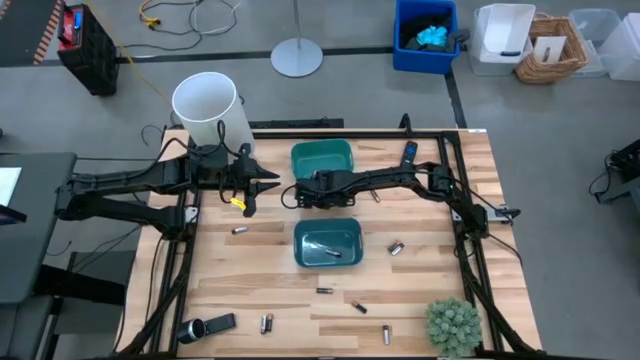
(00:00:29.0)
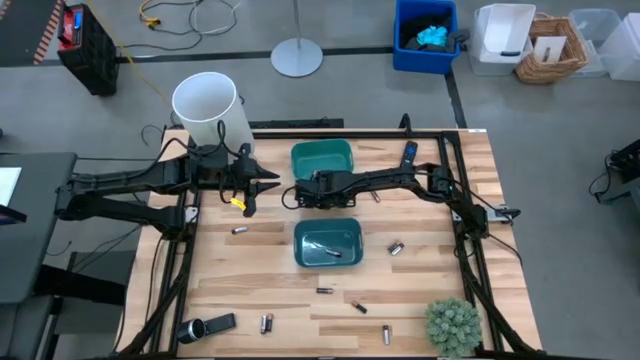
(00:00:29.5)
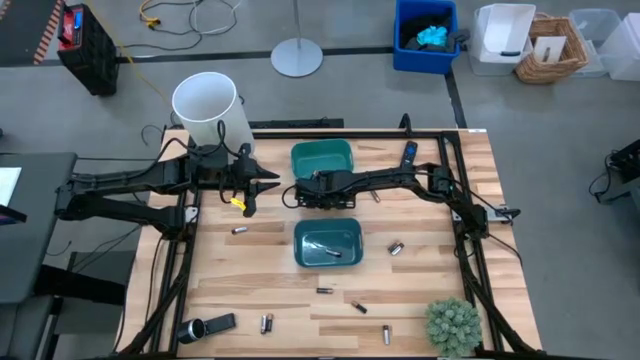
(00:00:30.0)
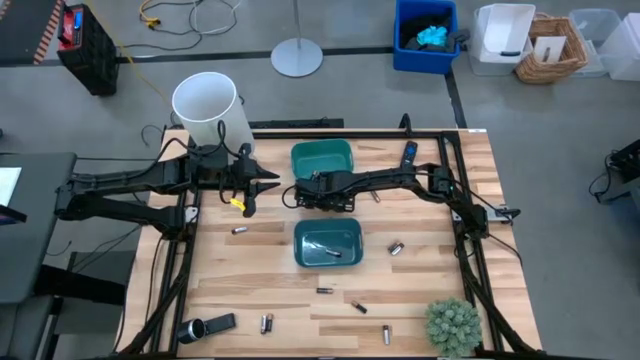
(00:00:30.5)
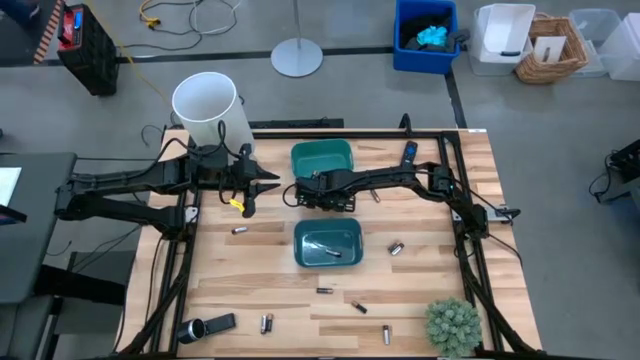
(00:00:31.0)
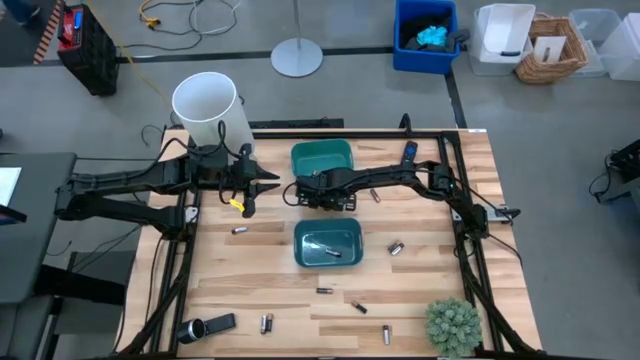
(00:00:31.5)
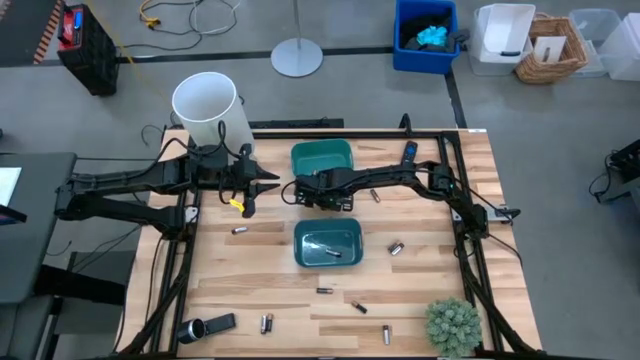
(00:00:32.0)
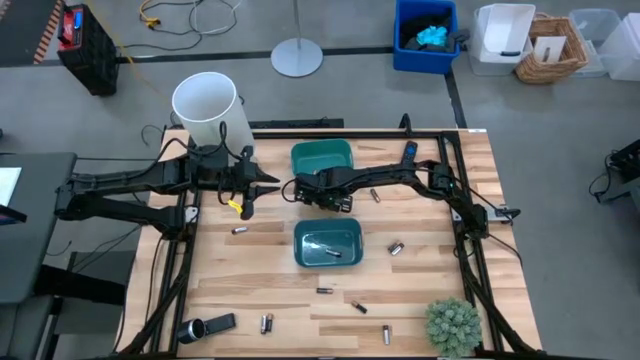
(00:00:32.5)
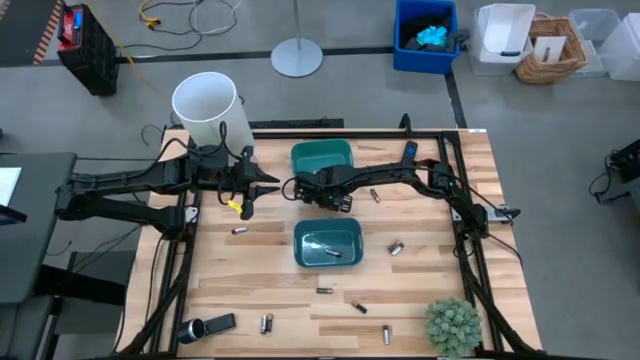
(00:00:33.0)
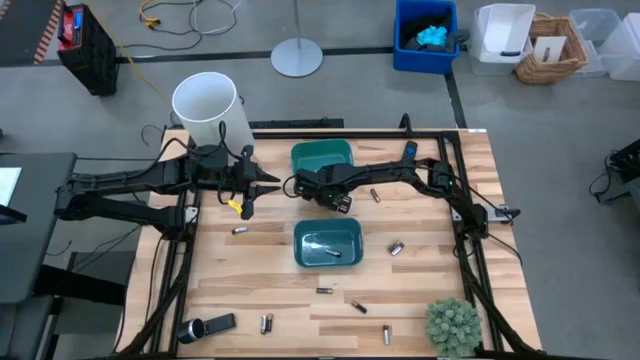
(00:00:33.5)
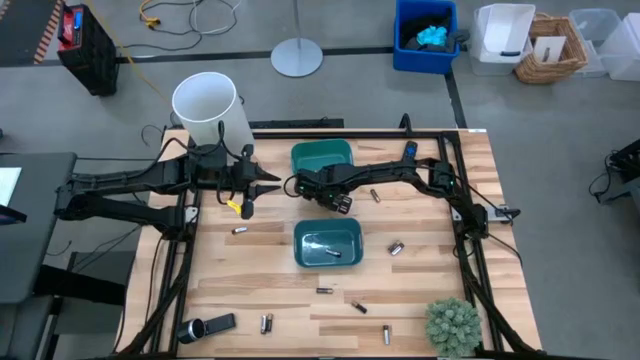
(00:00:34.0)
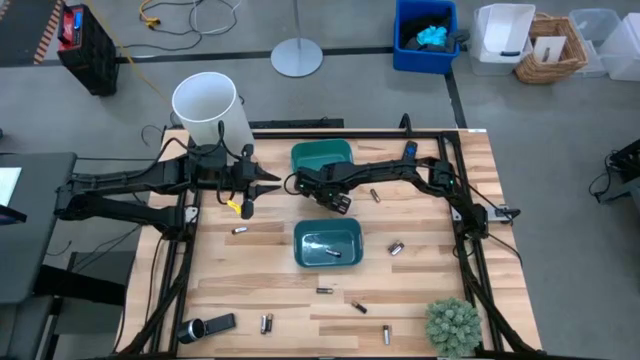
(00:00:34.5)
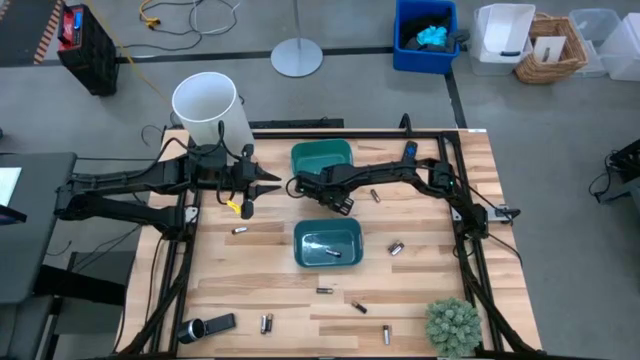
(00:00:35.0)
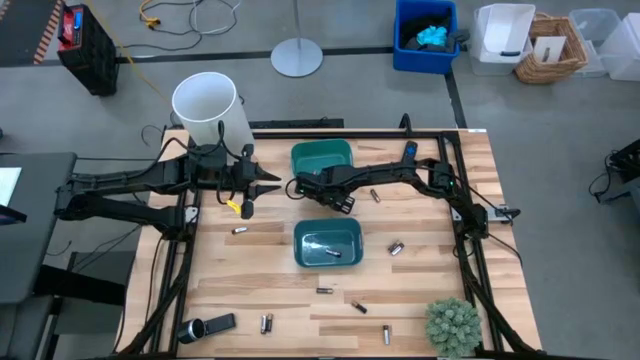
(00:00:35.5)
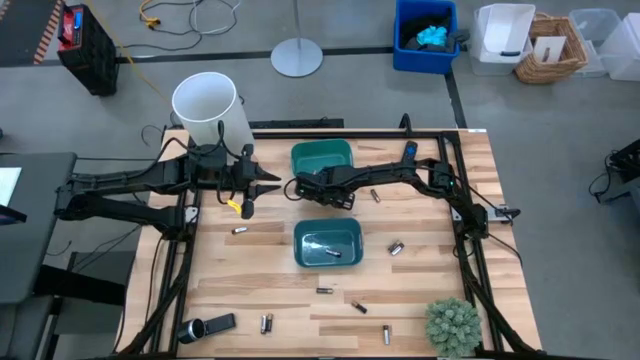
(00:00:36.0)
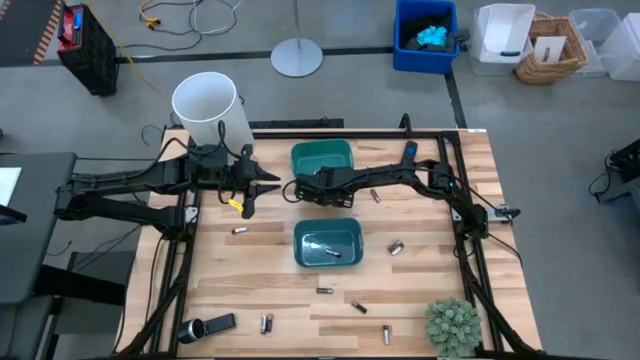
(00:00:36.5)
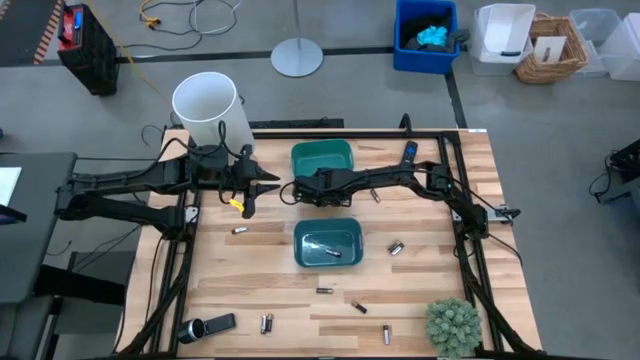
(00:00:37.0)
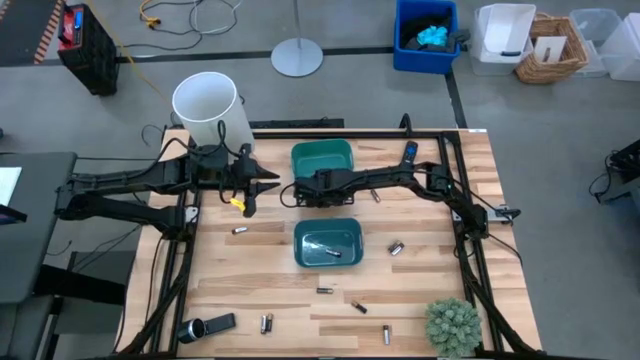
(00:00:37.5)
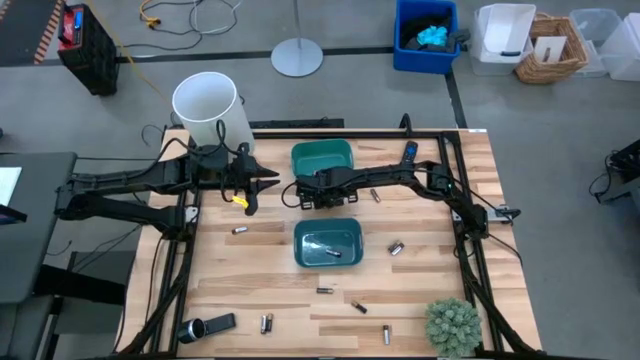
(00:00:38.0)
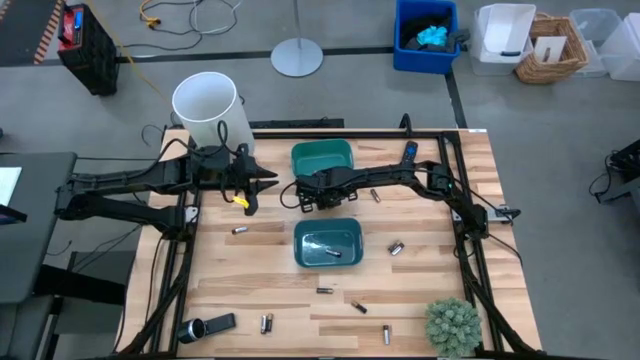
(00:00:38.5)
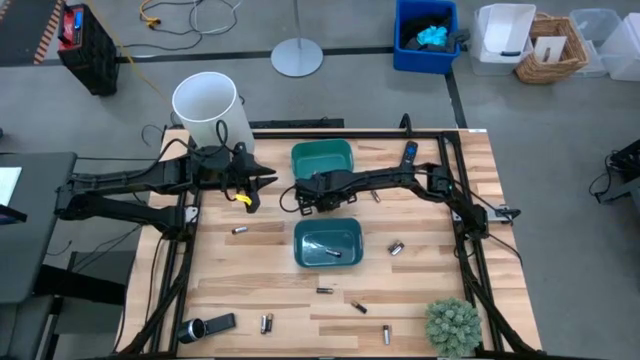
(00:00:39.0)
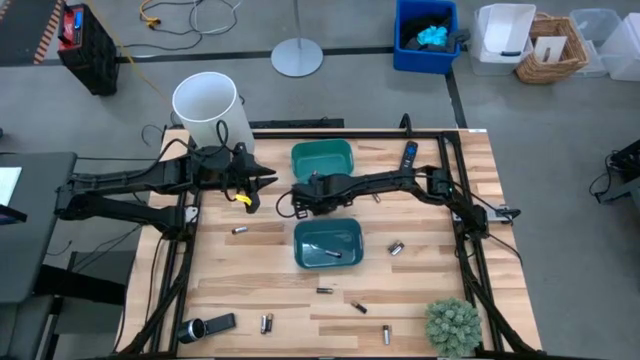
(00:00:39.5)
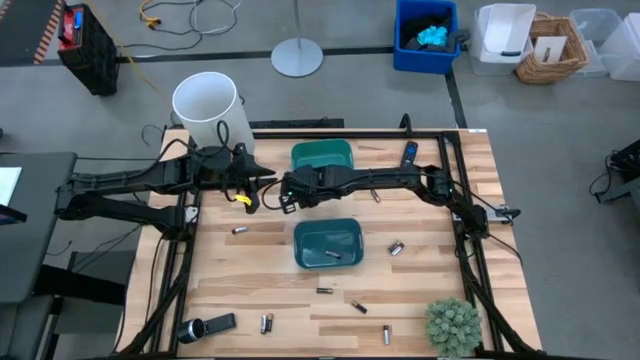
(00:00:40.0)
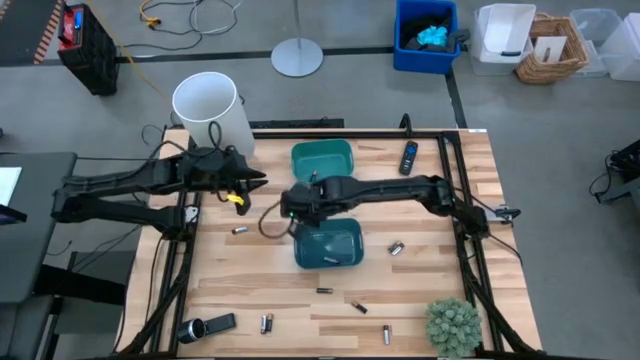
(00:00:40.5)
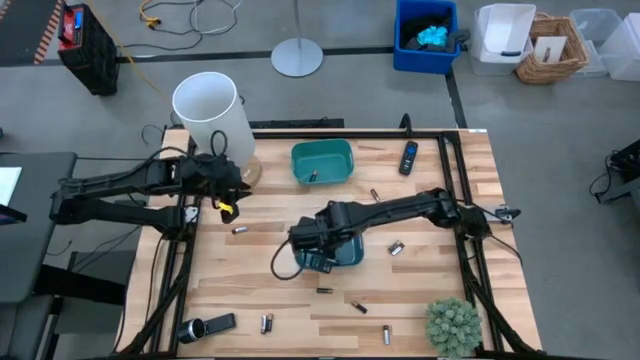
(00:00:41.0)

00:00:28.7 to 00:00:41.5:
Task: Sort batteries
Put the silver battery into the blue bin

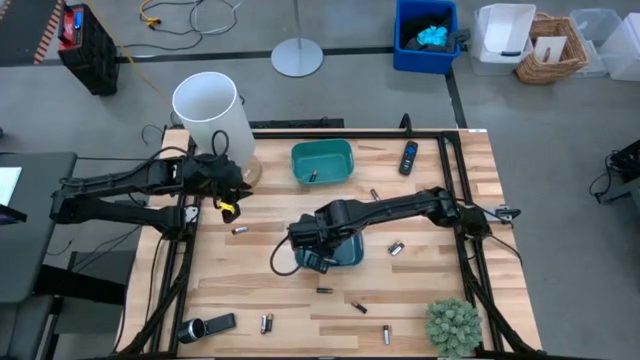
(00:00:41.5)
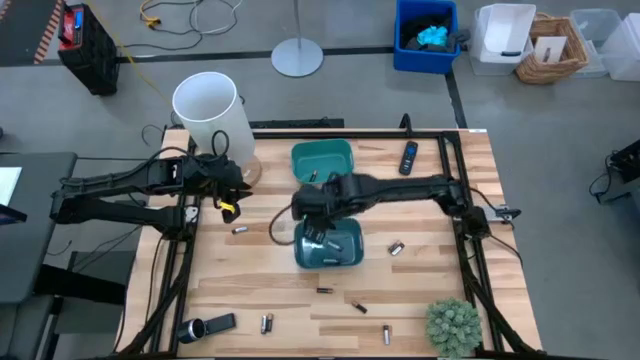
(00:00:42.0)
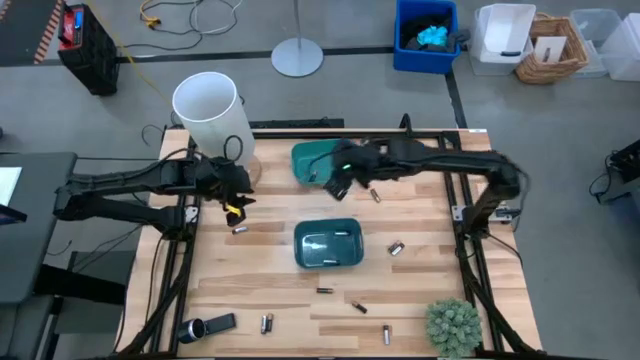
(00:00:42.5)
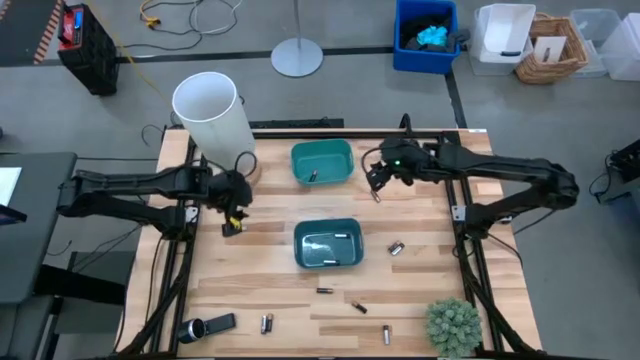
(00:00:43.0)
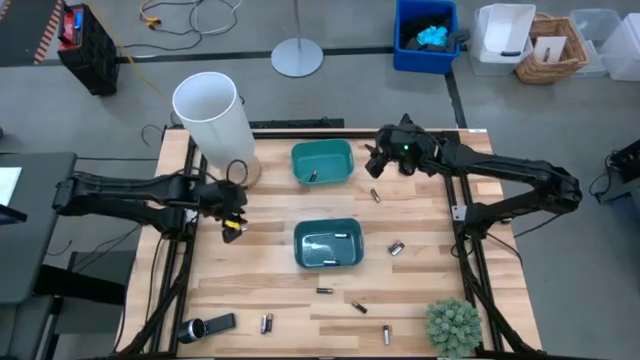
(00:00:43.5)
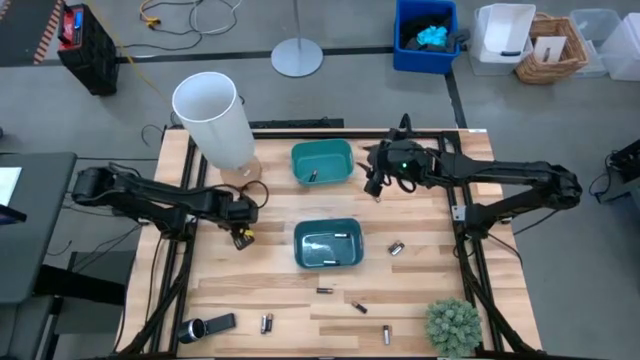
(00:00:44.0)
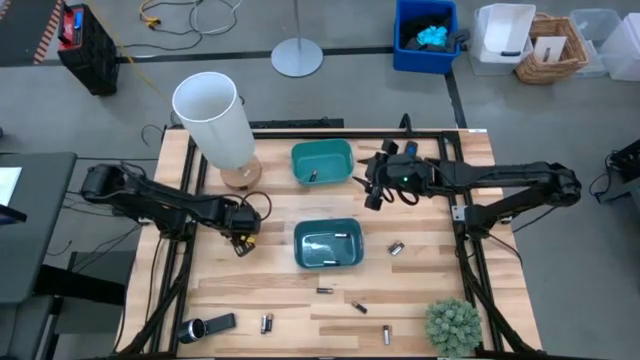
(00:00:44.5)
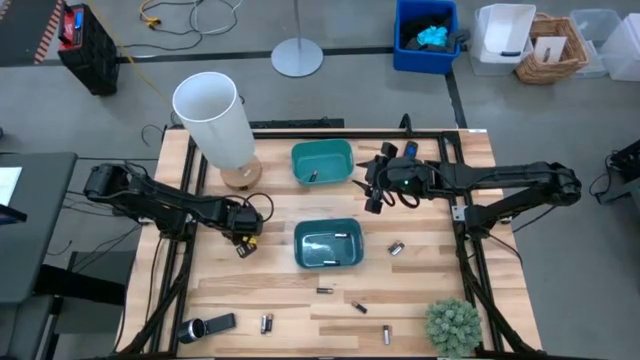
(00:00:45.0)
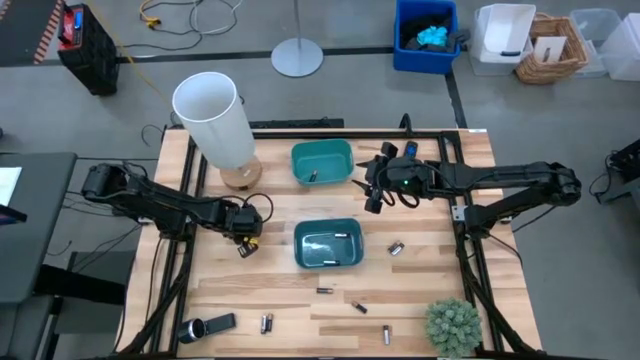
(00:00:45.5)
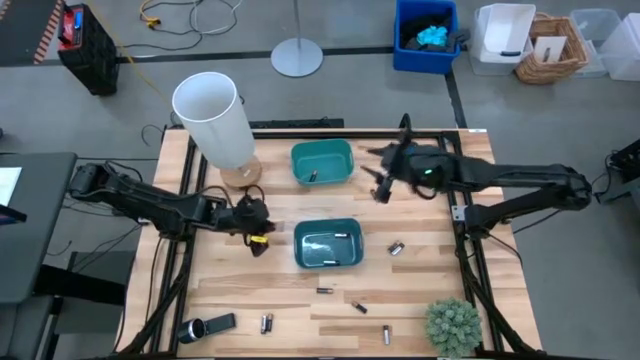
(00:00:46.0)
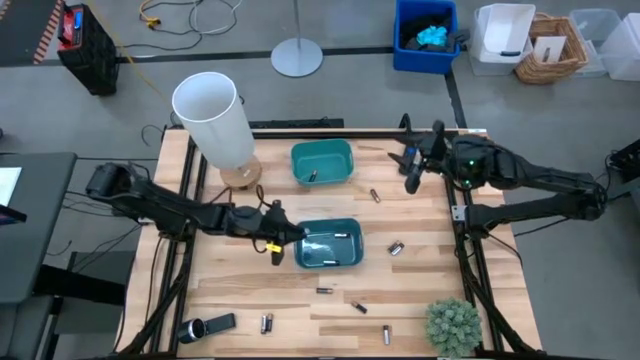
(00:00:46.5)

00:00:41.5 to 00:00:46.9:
Put the silver battery into the blue bin

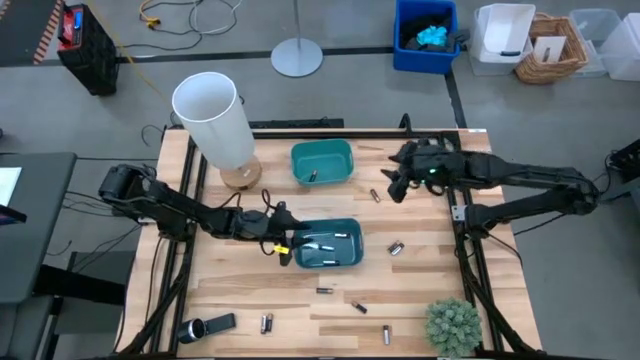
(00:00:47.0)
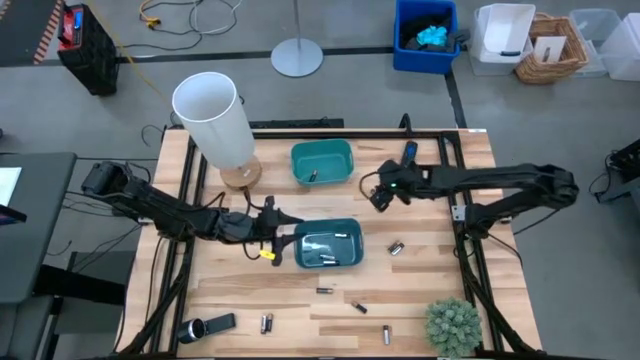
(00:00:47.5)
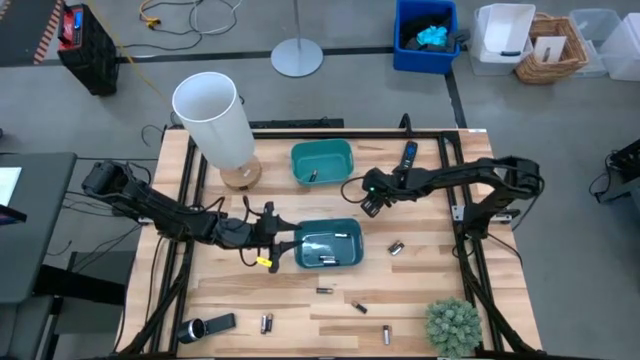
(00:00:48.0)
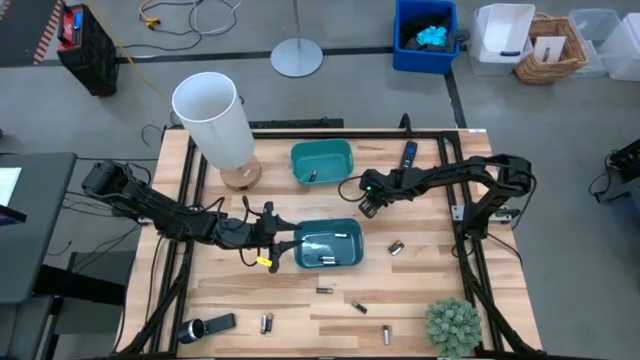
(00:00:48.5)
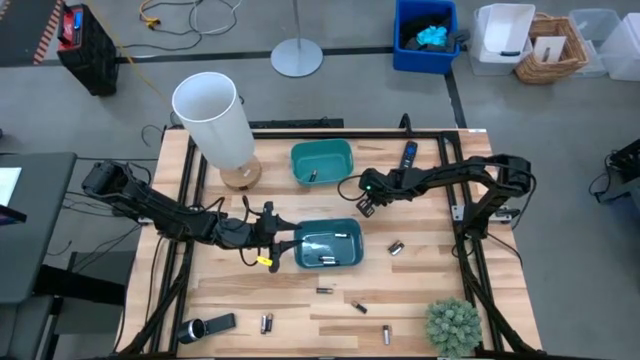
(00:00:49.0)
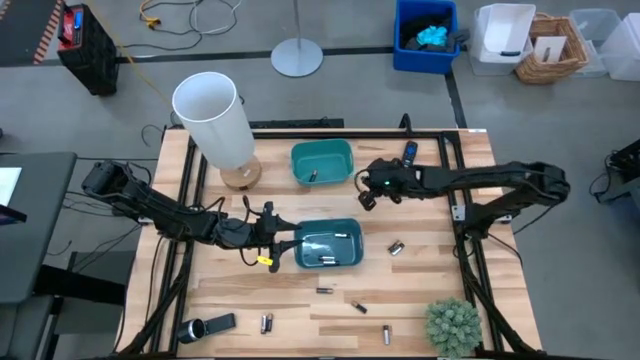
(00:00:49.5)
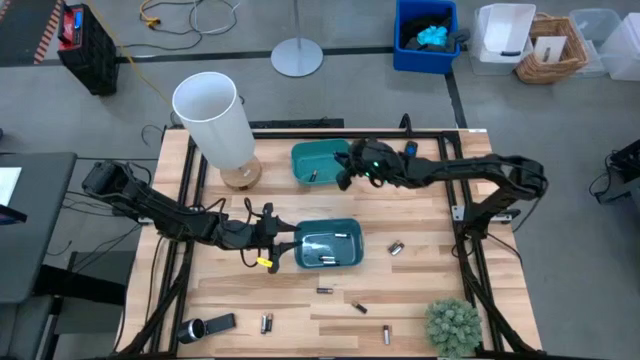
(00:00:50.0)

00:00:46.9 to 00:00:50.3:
Put the black battery into the green bin
